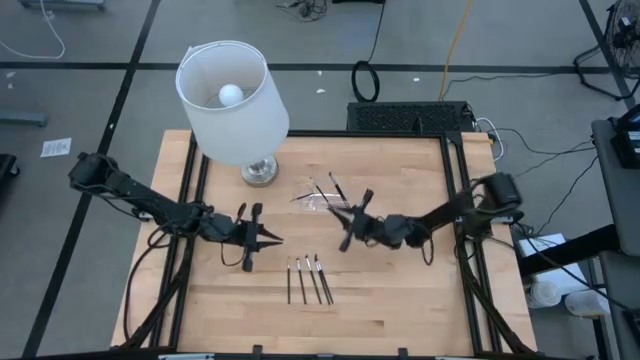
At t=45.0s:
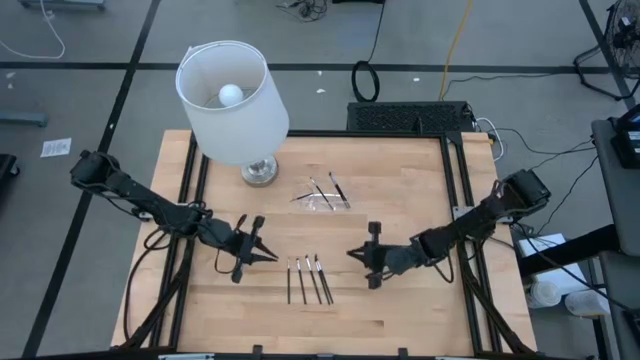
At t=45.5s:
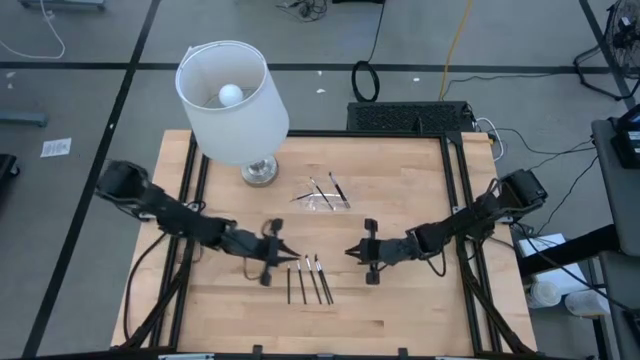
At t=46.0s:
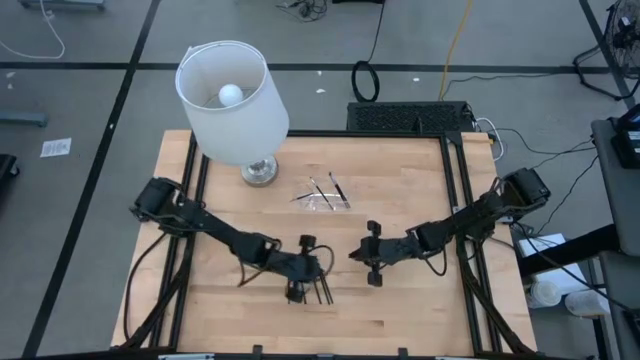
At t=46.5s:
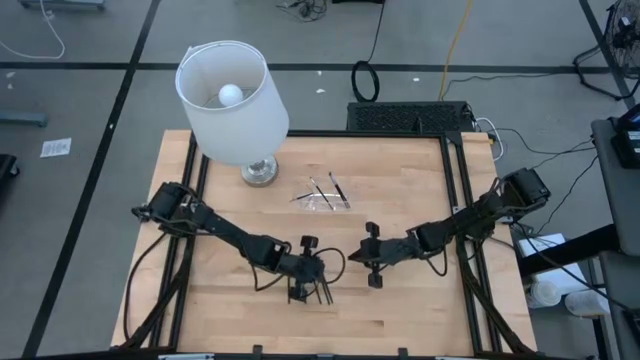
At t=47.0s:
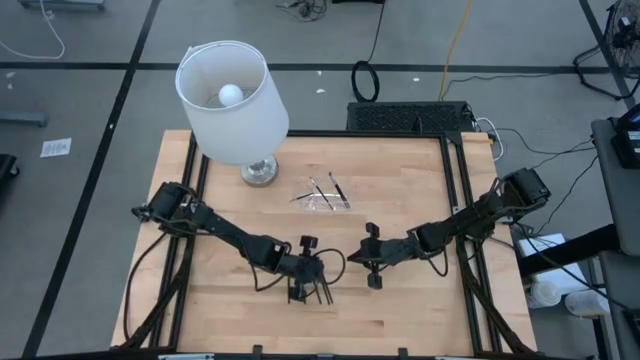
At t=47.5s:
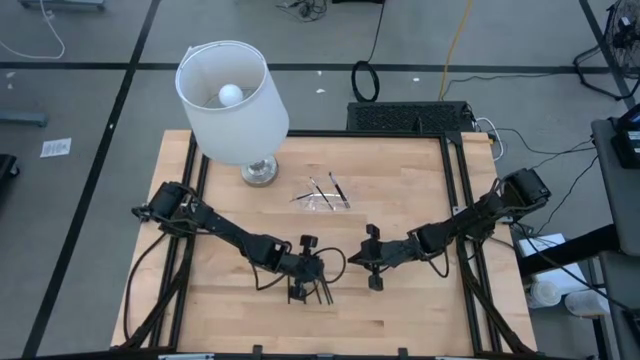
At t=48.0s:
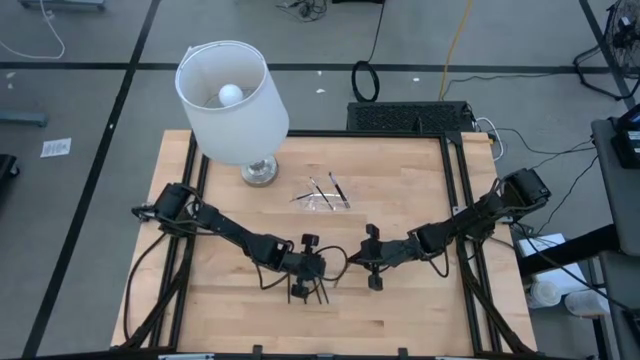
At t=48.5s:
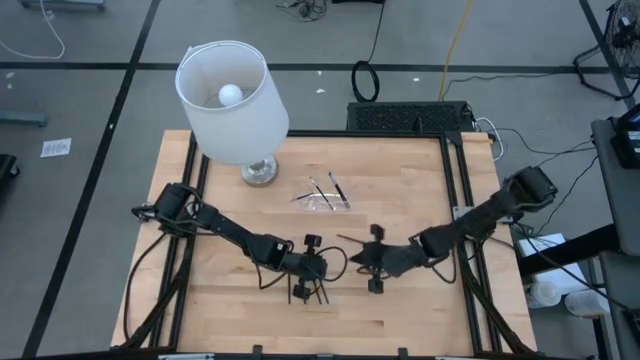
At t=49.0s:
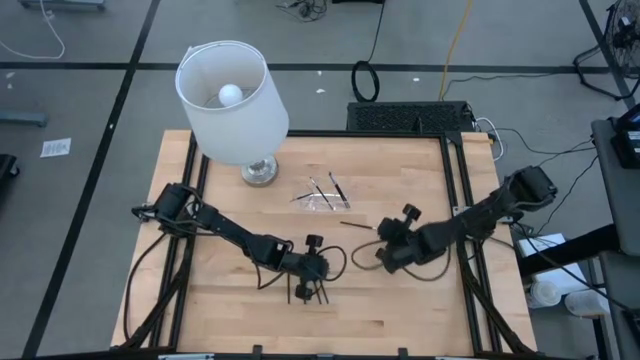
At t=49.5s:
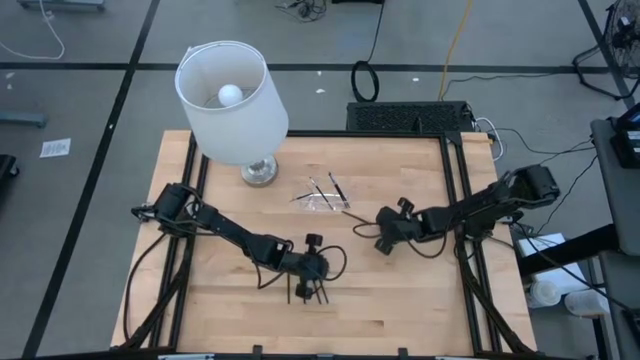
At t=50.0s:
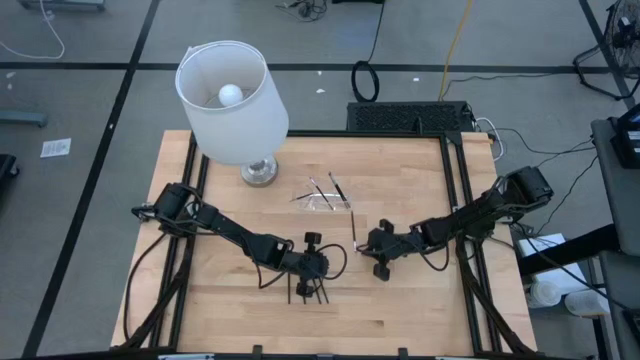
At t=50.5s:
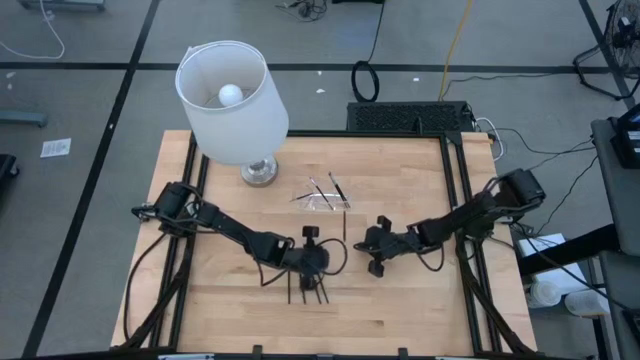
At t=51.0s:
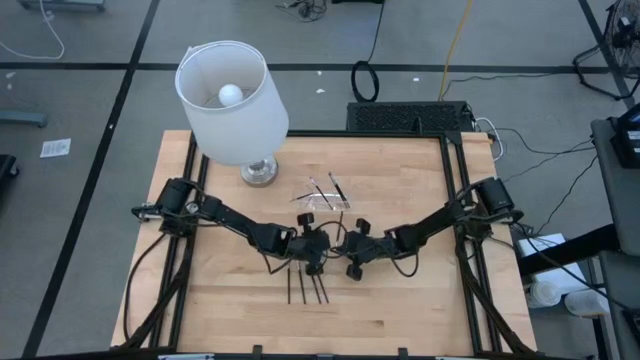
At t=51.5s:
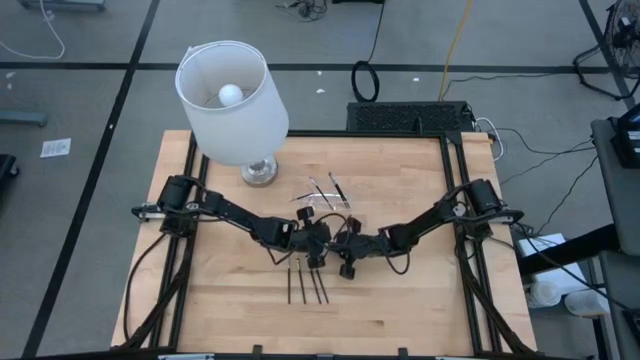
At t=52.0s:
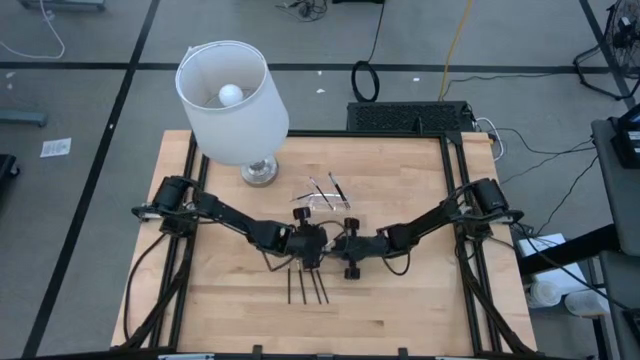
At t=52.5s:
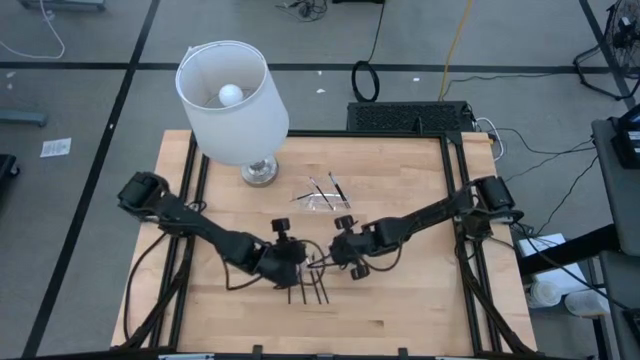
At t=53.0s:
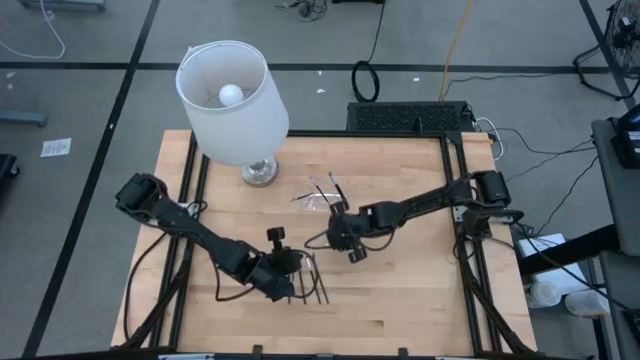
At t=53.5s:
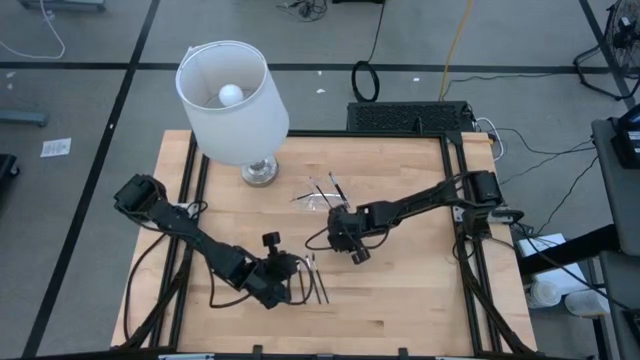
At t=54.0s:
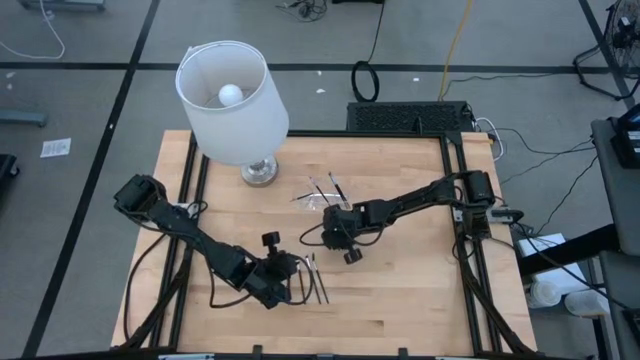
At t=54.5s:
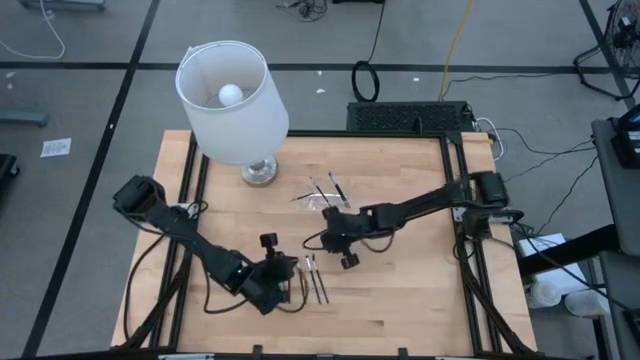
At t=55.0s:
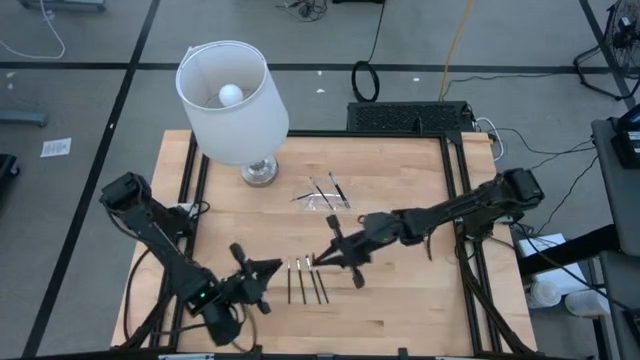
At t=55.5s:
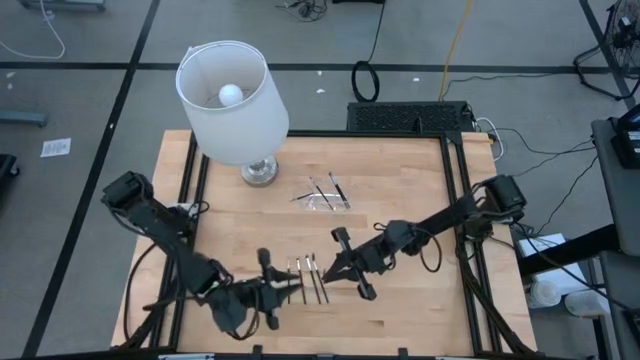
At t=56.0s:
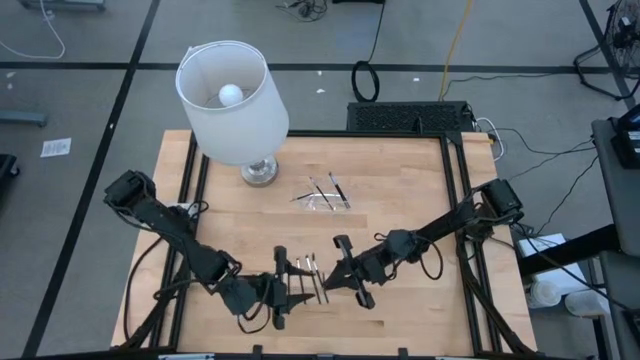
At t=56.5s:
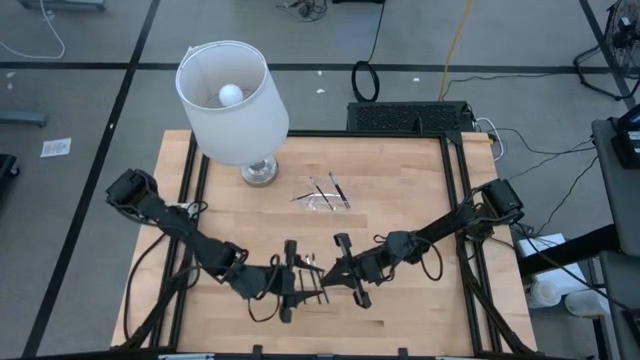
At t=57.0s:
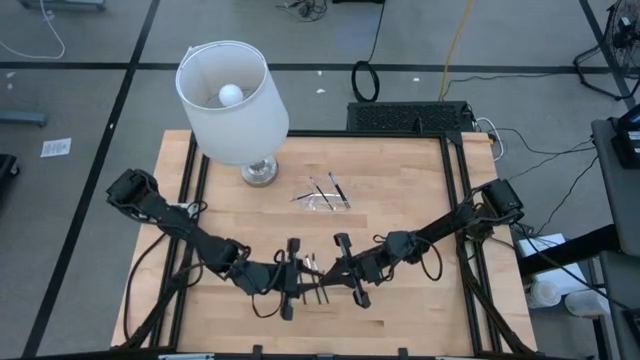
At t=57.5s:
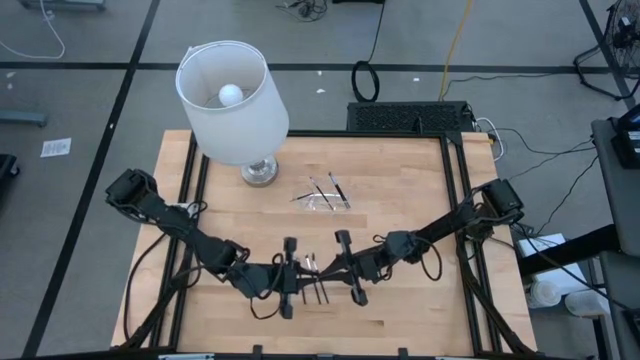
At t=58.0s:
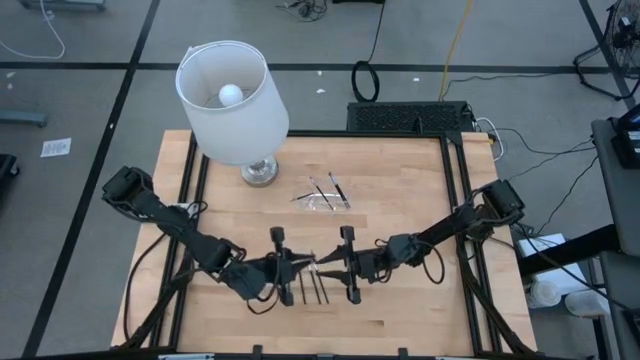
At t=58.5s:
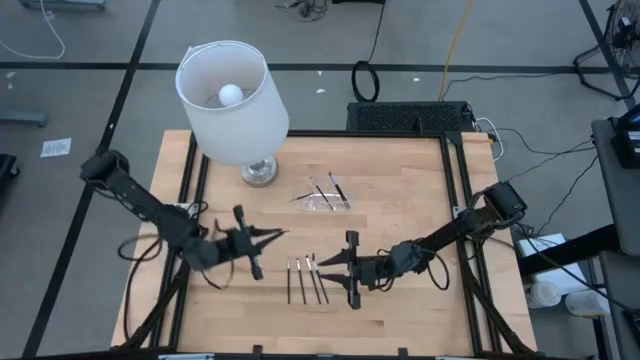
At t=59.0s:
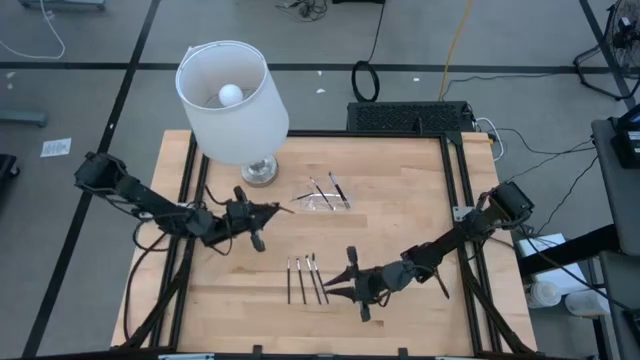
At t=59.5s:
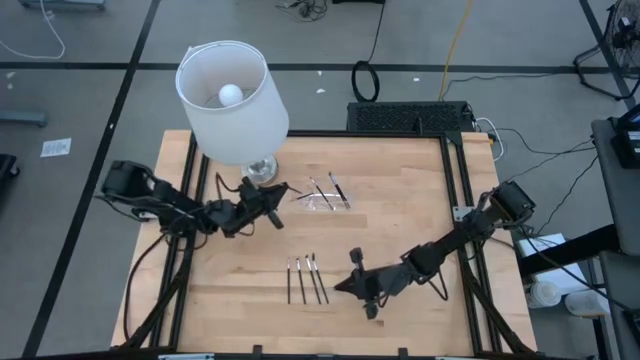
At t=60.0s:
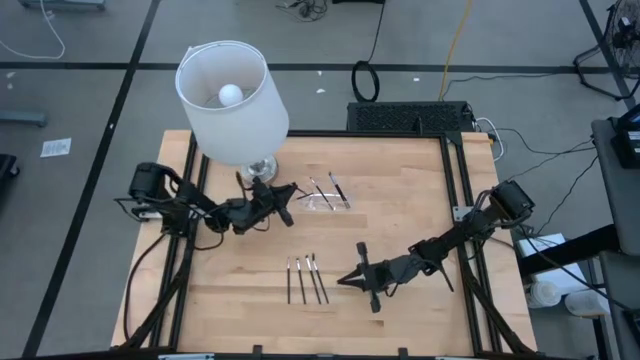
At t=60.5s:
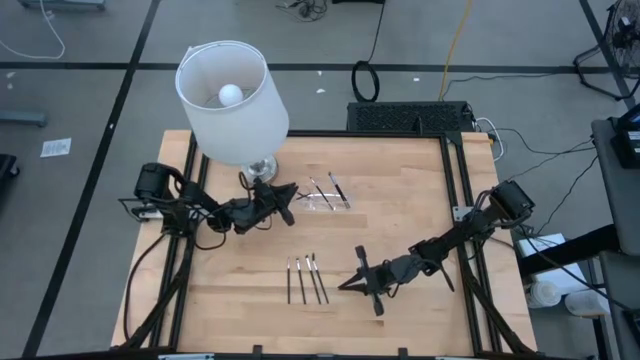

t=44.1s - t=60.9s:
Task: Put items in baskets/containers
Put the black eyeshadow brush into the transparent organizer
